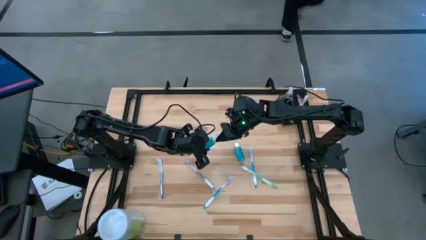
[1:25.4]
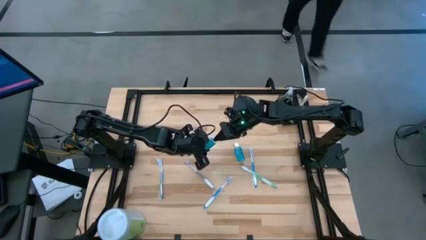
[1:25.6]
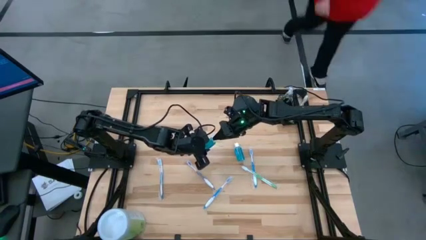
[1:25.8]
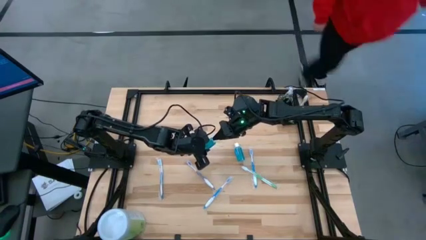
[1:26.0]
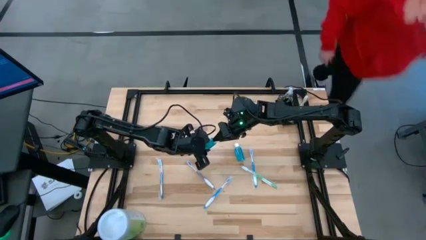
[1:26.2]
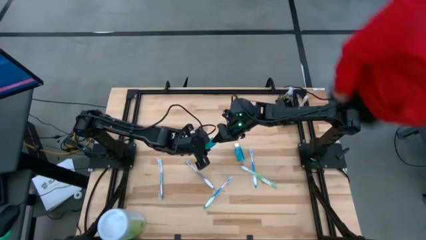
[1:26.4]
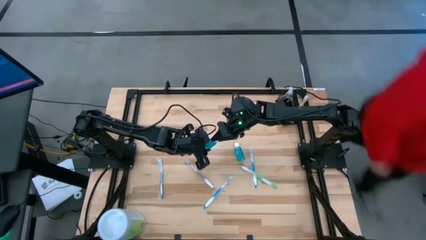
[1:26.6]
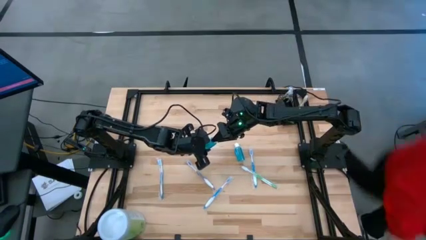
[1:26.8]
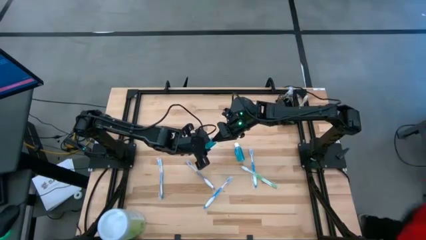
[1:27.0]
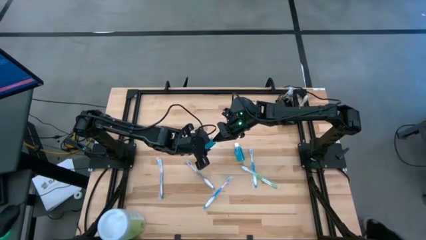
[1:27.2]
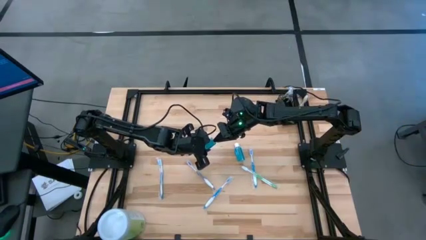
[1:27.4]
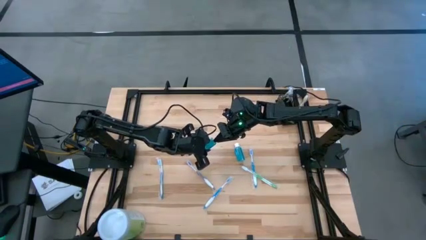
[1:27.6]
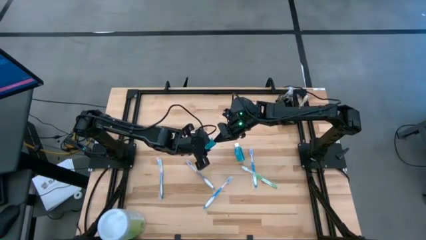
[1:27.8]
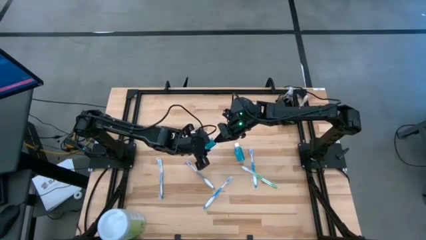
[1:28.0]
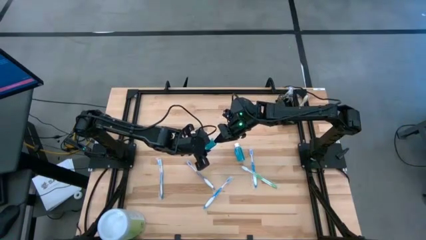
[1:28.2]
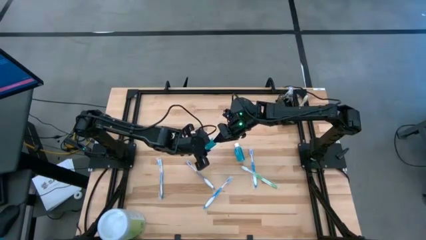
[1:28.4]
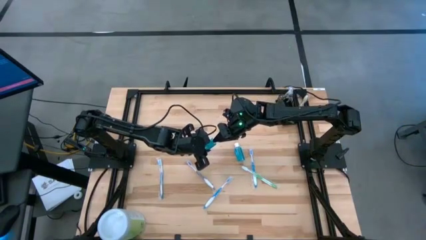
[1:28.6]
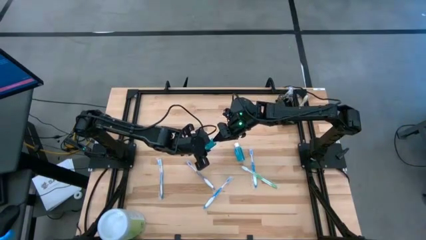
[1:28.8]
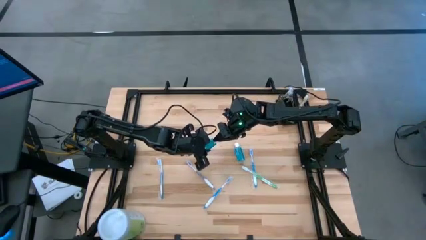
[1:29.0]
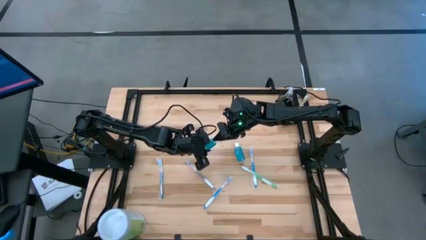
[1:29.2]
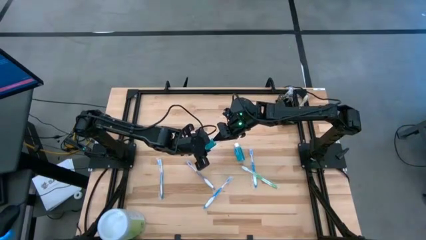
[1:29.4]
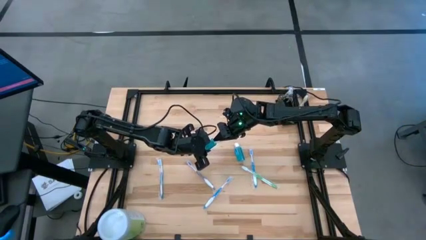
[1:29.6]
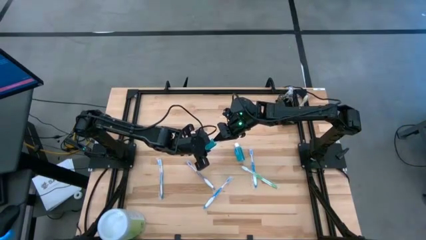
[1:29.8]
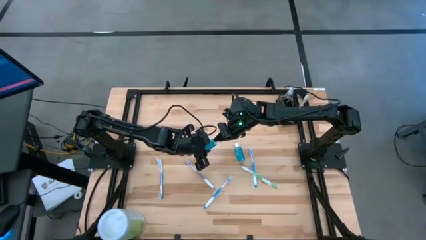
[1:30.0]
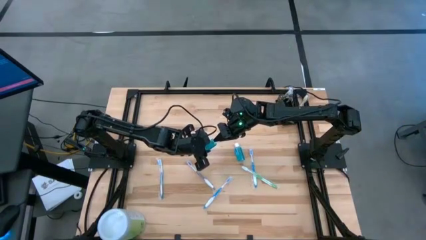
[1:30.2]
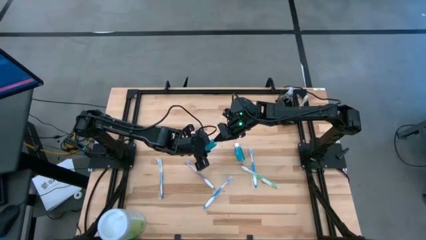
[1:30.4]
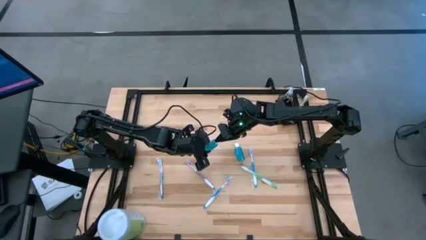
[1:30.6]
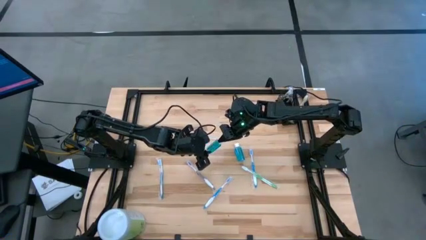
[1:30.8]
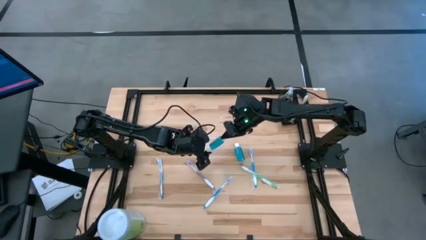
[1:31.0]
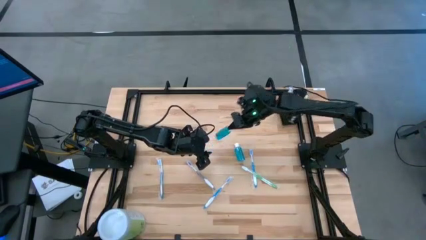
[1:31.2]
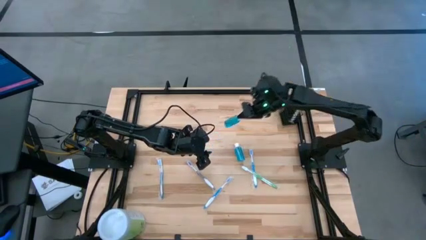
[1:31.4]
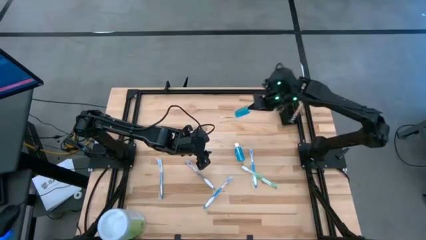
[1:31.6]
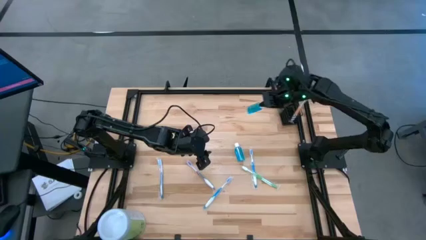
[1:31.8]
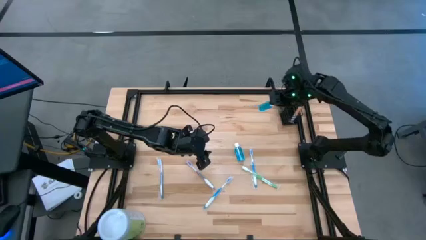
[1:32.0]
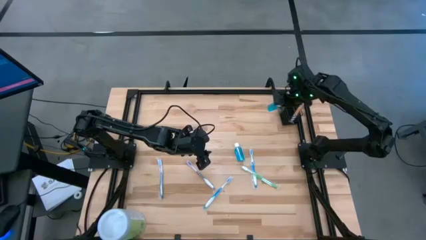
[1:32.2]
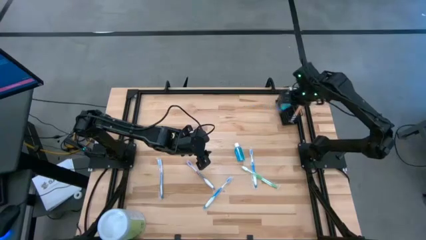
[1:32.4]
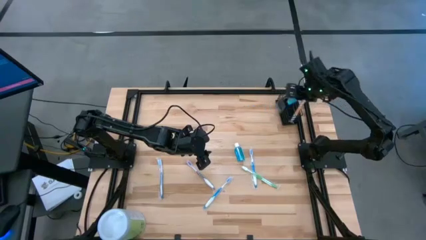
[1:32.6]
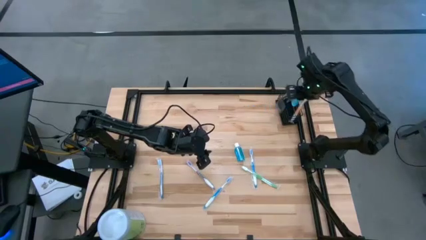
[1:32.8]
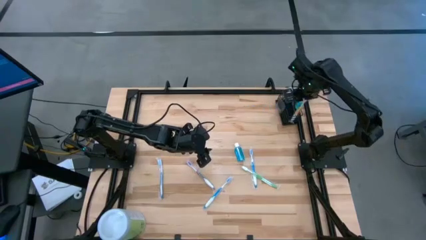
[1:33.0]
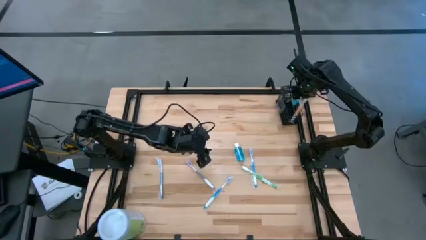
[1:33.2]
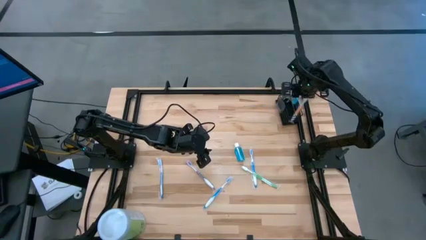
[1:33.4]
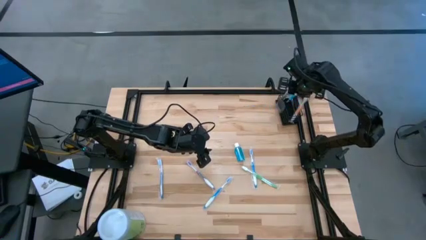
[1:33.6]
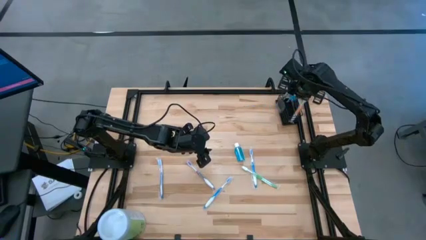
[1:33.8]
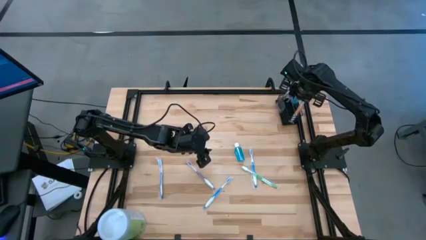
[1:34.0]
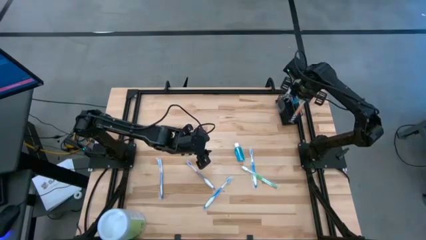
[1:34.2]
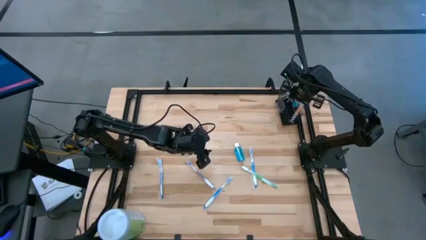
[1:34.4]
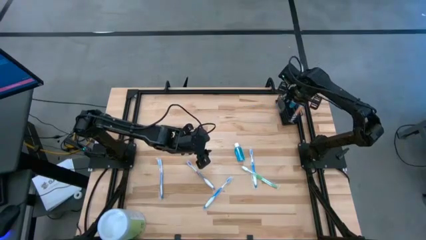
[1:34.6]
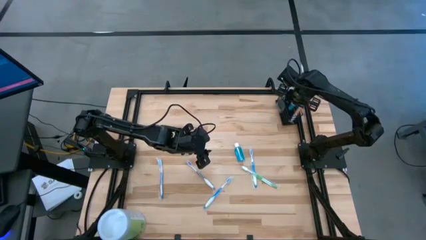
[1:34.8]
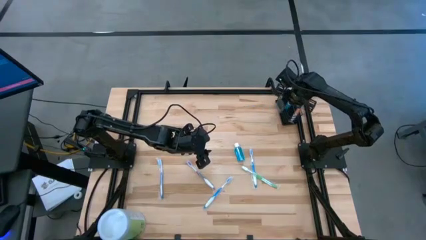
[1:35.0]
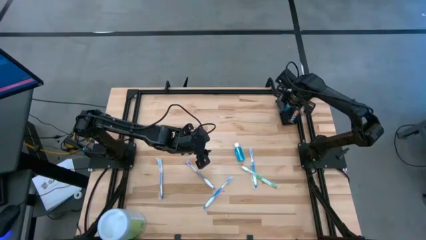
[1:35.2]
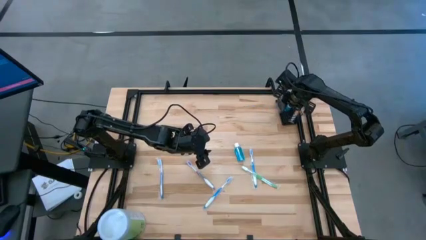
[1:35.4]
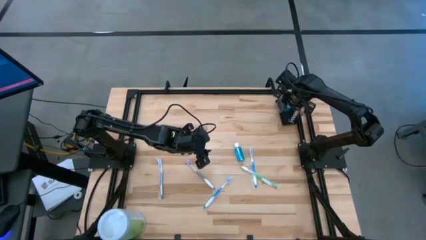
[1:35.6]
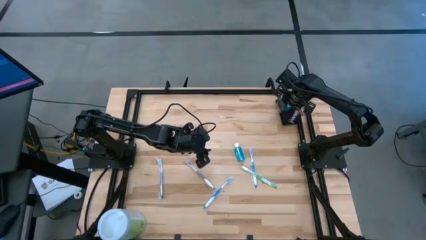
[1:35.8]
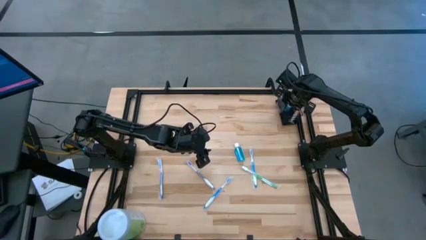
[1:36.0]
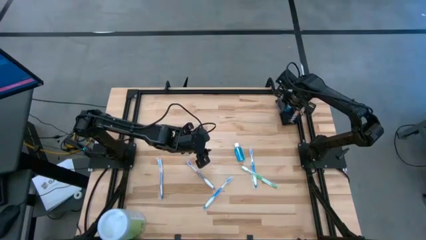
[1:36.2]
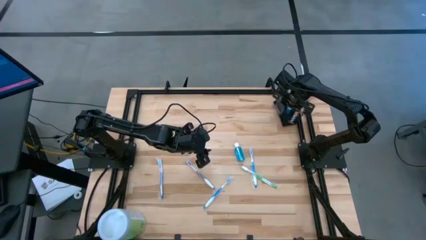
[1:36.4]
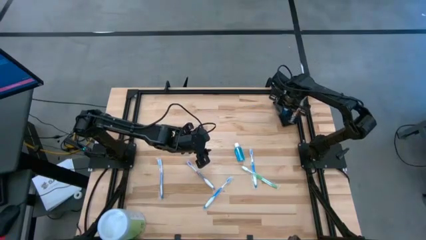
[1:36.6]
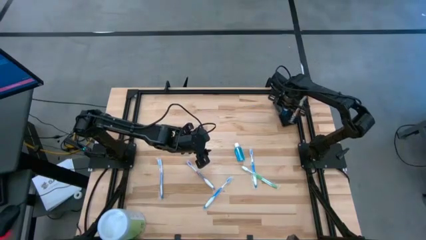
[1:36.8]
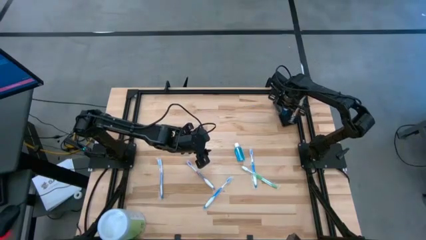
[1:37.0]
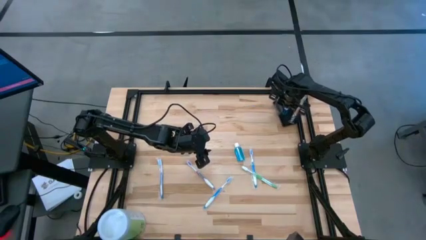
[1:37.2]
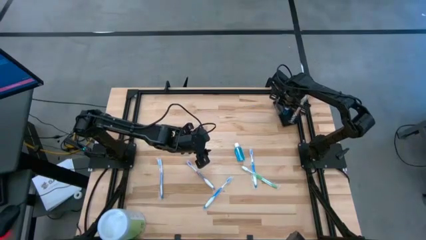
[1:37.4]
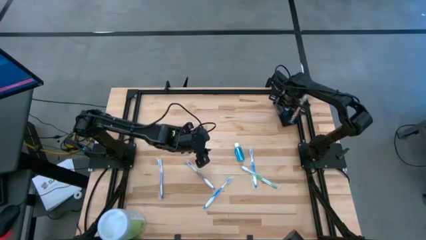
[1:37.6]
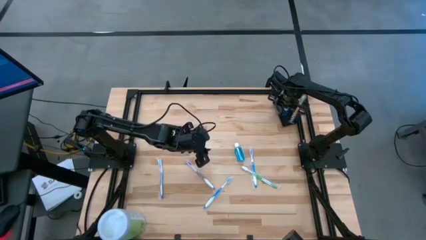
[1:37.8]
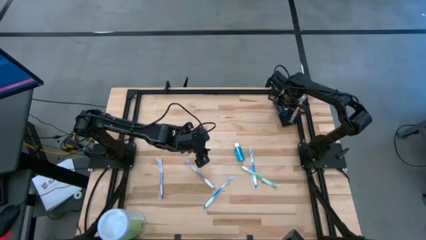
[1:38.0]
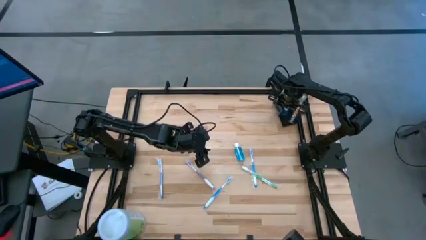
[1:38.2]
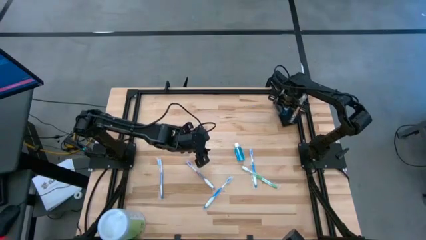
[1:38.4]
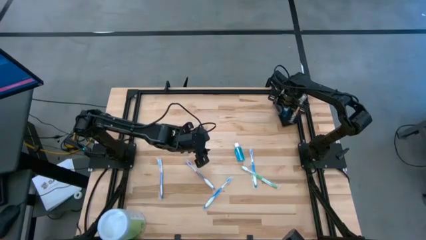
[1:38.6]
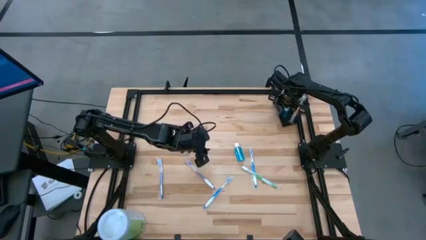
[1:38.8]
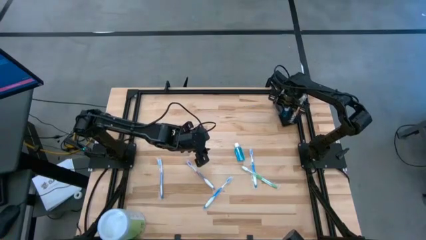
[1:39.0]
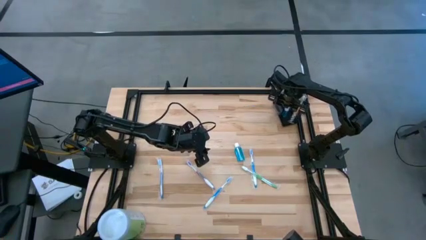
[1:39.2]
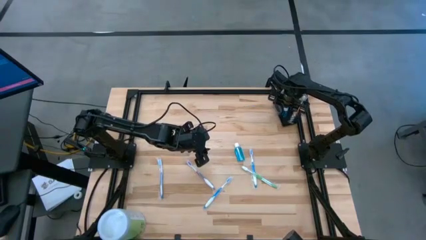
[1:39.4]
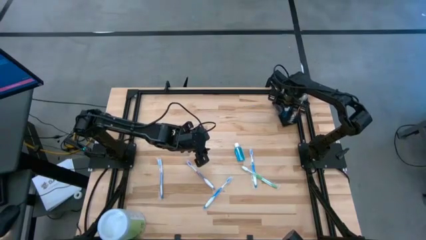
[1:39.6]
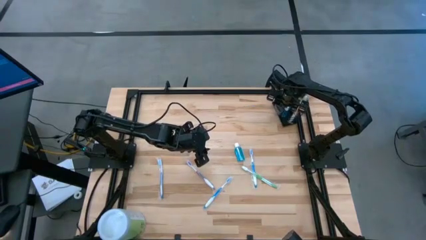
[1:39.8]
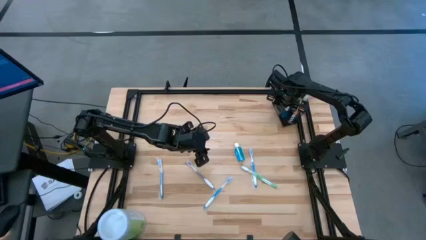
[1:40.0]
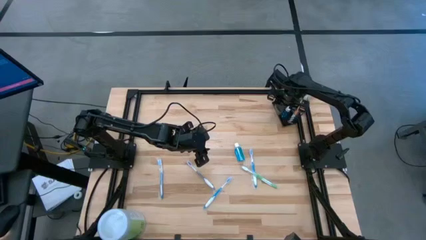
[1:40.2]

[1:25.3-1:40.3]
Task: Pick & Place toothbrushing station
Put the left blue mouthwash into the middle section of wire organizer

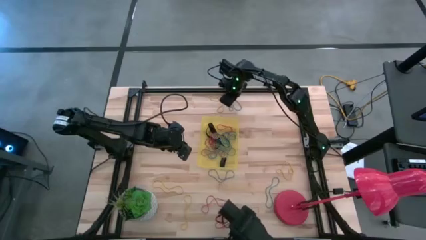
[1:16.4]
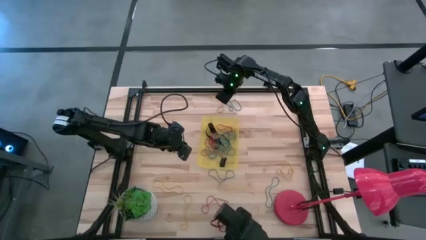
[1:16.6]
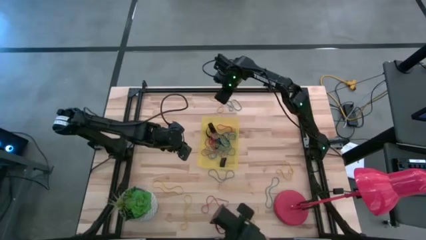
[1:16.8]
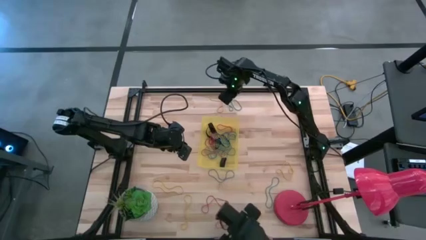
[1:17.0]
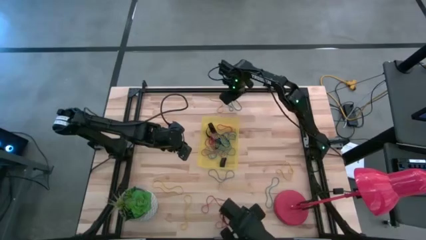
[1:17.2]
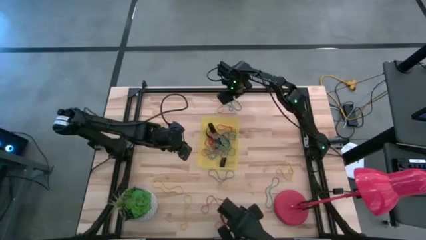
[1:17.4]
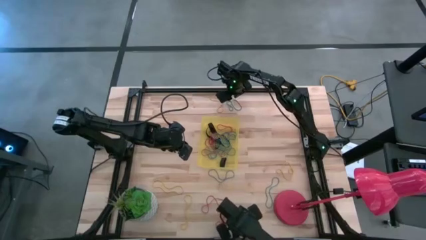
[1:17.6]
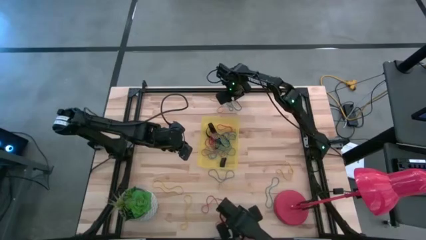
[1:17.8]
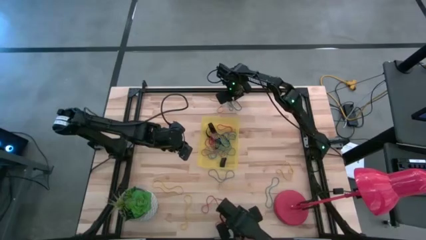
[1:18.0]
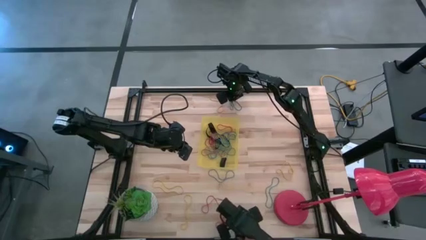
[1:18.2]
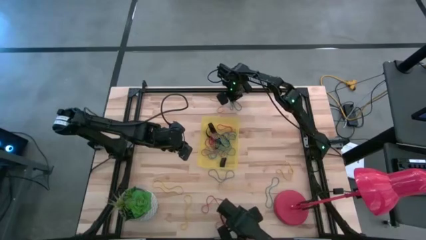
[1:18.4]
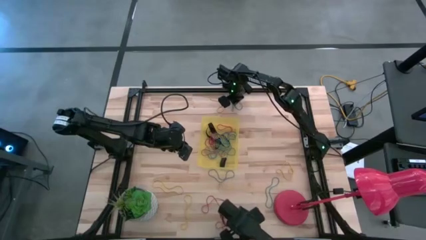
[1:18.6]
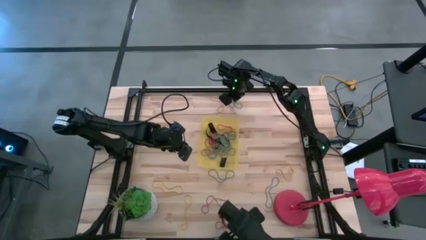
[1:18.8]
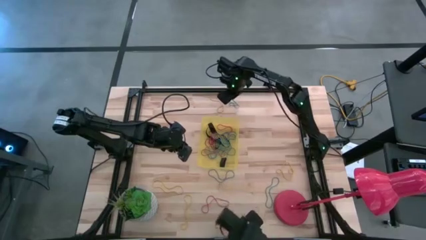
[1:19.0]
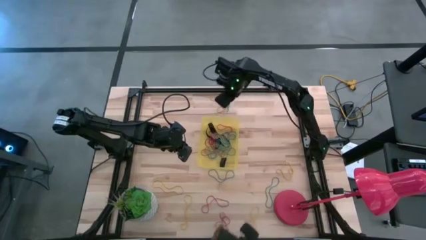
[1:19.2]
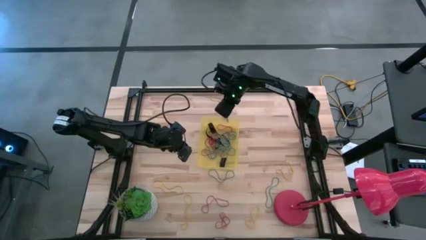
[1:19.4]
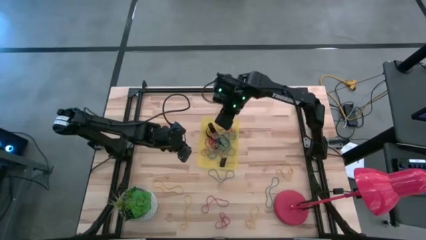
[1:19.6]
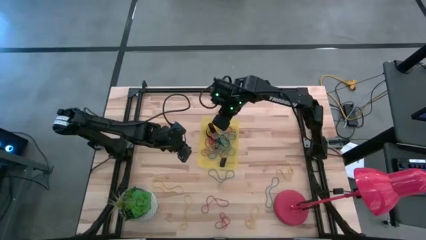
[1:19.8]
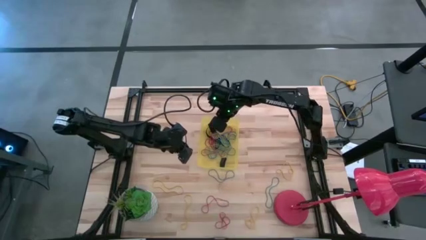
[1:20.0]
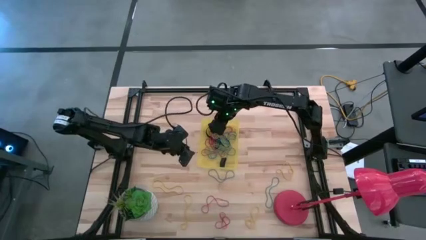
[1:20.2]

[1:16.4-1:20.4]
Task: Pick and place rubber bands into bin
Put the blue rubber band into the yellow bin
